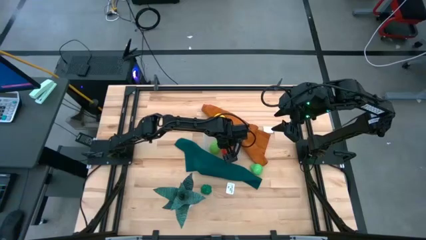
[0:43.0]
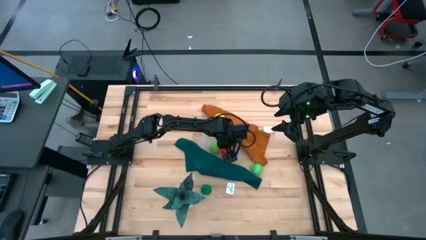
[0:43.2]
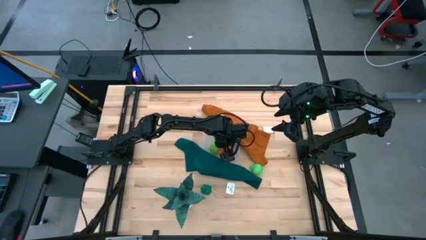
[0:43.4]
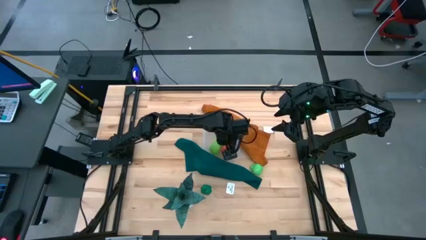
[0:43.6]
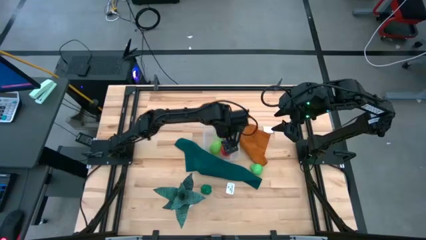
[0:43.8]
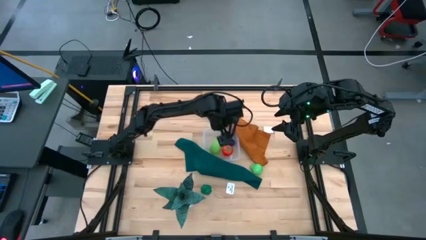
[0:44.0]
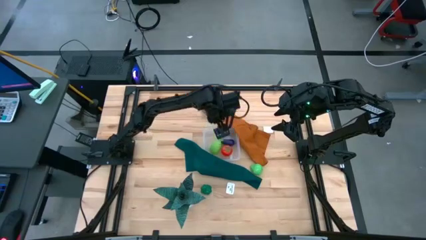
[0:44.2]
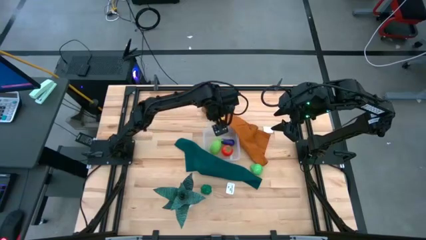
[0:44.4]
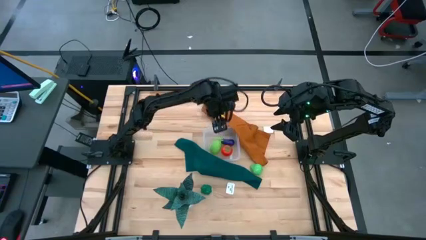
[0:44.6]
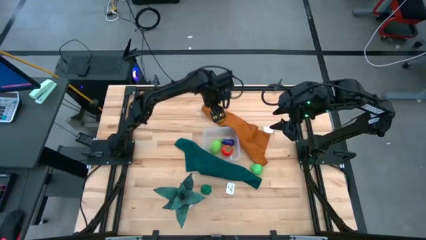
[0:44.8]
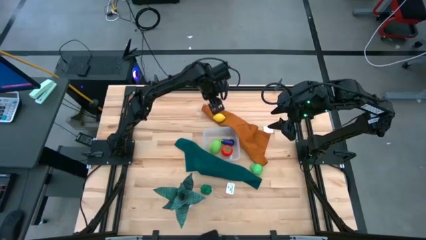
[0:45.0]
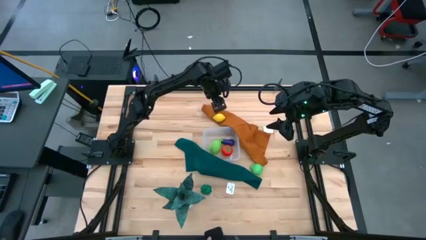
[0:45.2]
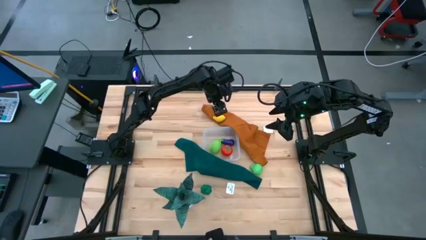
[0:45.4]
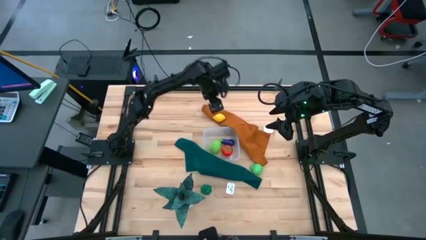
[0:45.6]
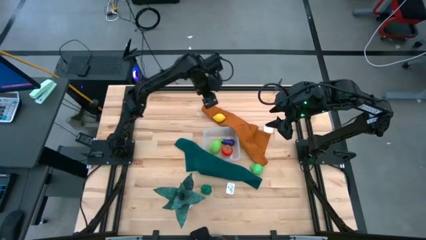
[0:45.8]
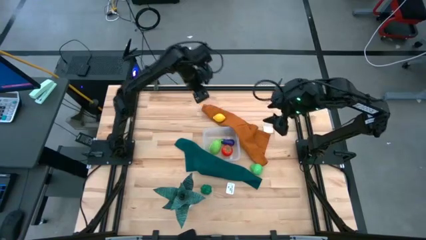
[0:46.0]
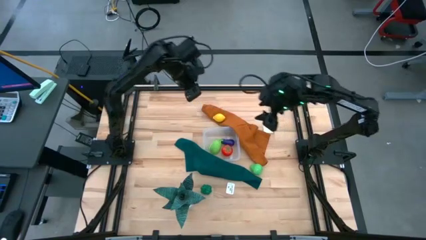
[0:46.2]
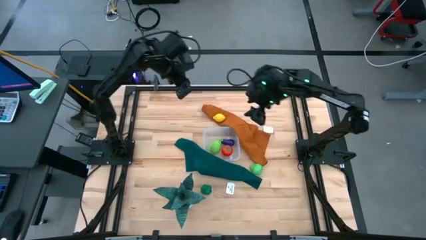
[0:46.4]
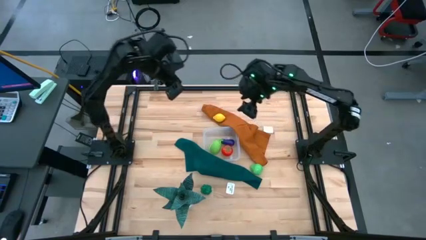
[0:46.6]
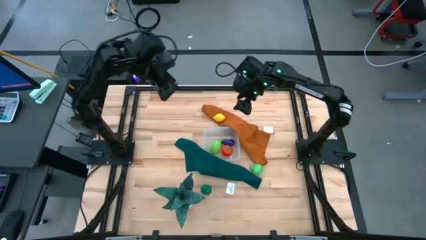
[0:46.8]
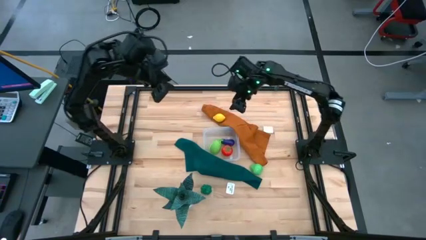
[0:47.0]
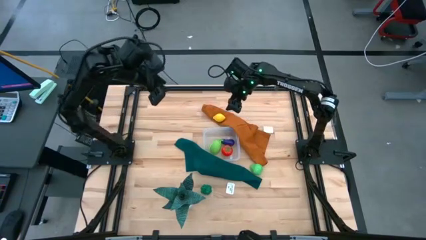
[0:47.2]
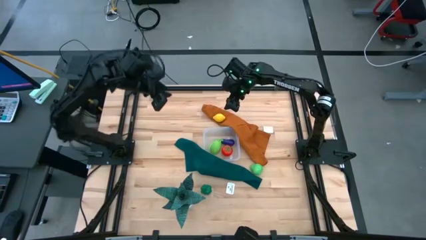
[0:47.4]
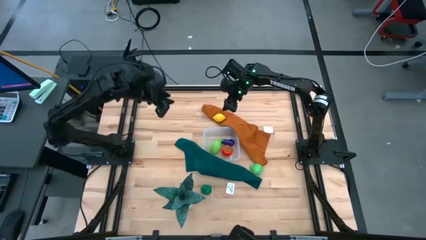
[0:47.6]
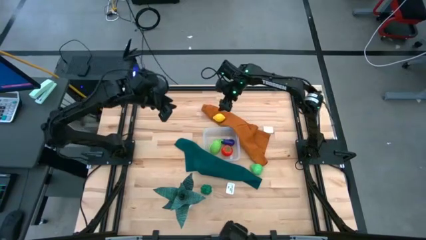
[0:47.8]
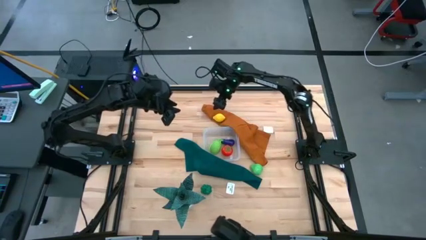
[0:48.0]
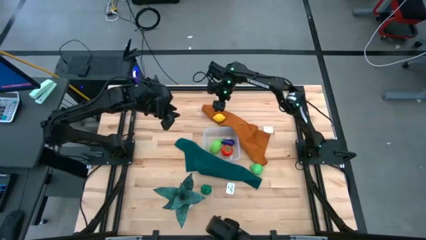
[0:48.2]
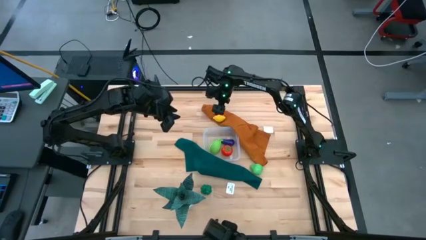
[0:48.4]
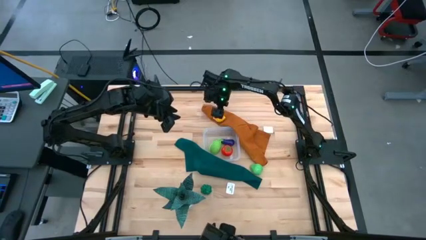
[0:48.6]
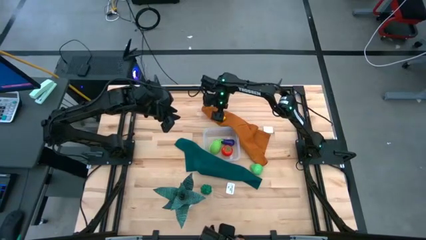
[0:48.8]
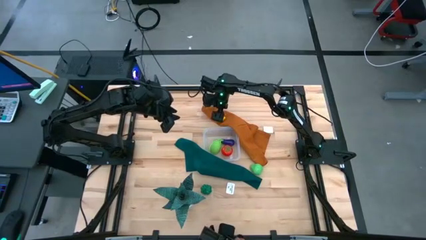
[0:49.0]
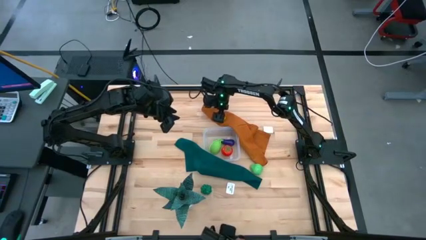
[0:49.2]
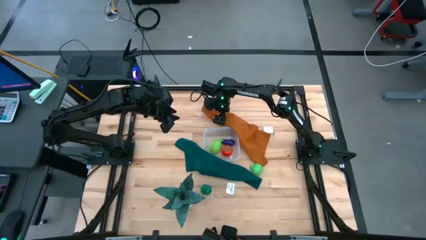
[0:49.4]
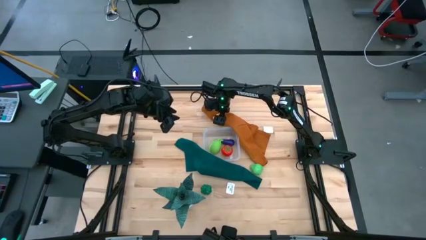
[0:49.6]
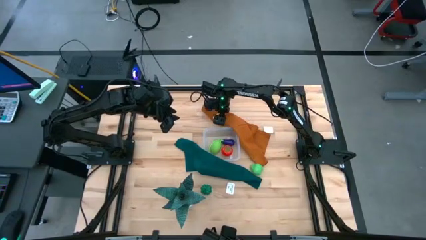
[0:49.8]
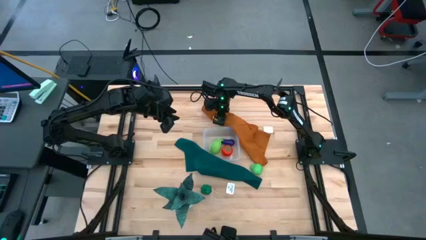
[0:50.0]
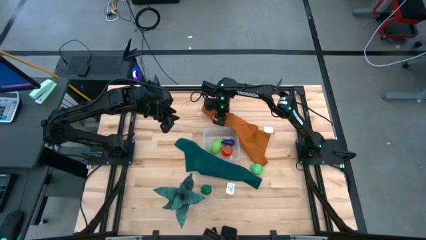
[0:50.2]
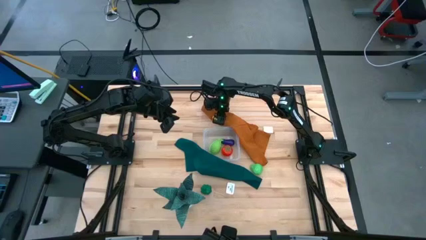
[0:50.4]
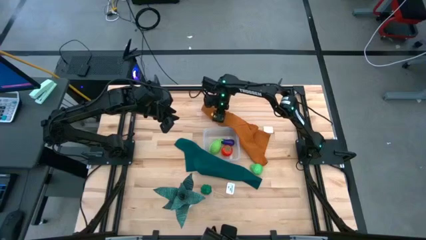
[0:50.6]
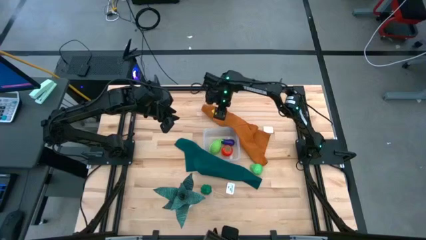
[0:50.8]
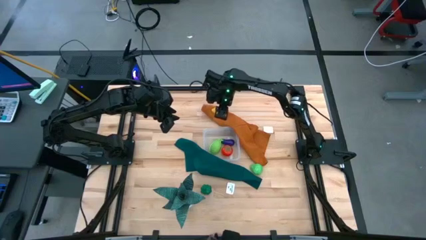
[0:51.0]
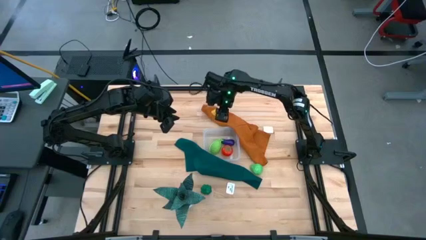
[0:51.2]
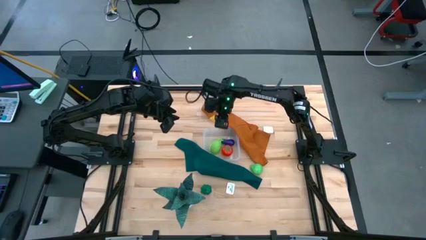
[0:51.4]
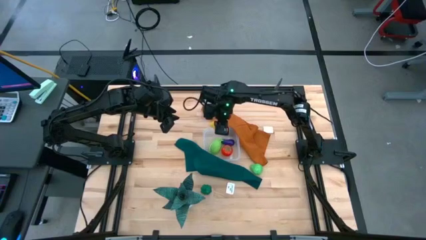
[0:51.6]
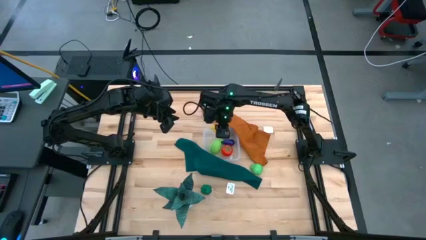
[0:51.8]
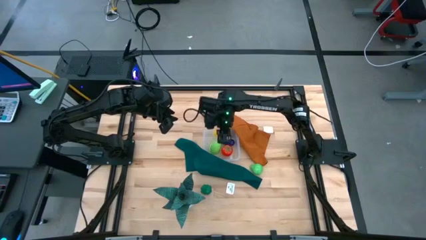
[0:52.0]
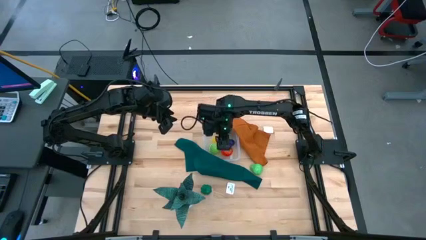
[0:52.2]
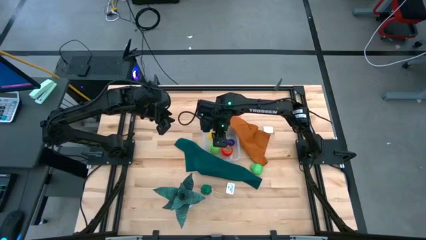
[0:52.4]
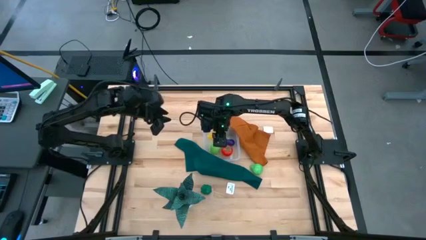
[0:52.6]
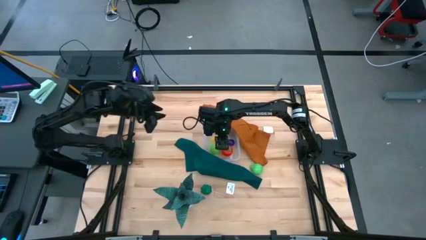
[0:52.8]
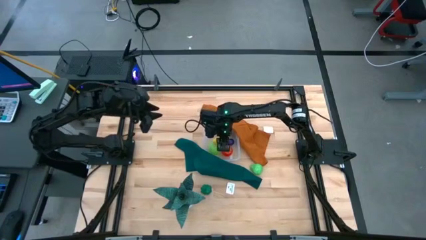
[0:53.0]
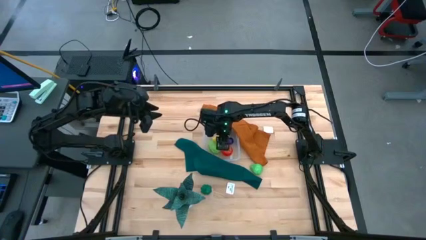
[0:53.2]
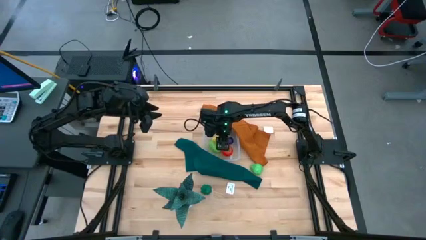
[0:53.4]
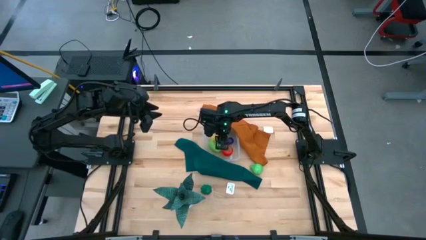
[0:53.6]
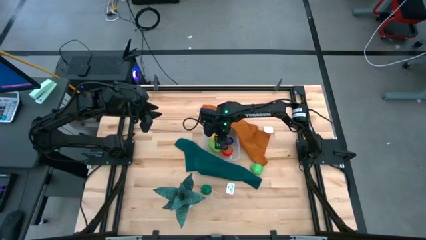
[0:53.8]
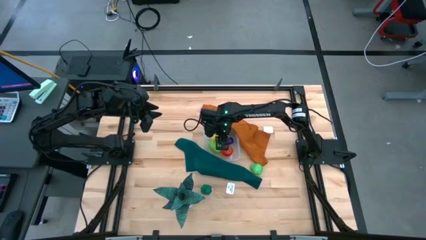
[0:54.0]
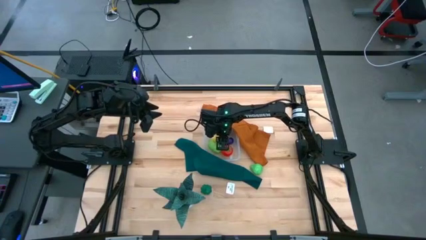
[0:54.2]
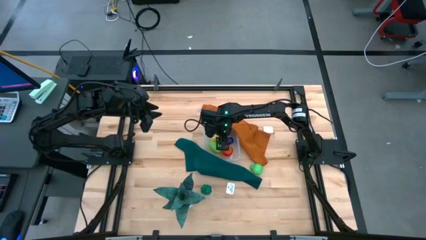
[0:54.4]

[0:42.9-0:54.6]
Task: Pick and placing Produce into tupperware
Put the yellow lemon into the transparent bin

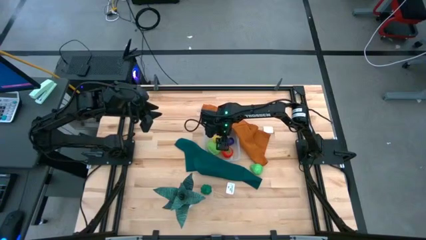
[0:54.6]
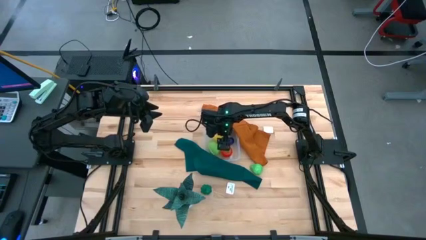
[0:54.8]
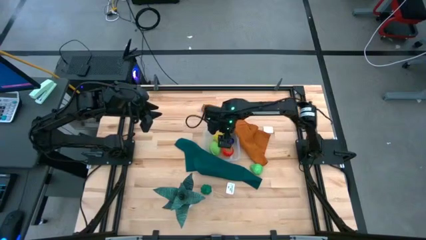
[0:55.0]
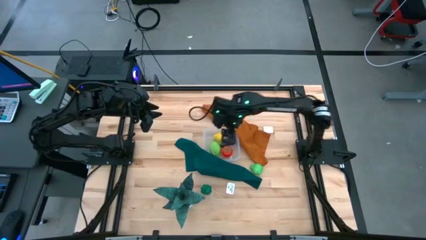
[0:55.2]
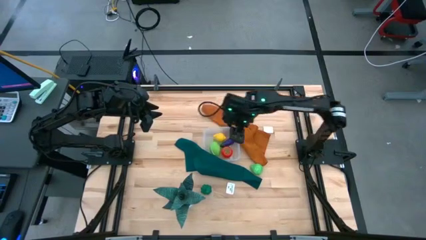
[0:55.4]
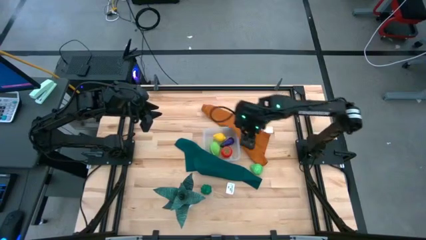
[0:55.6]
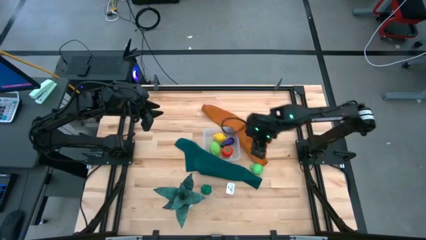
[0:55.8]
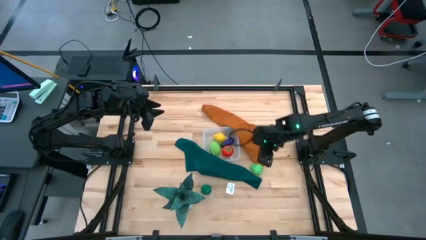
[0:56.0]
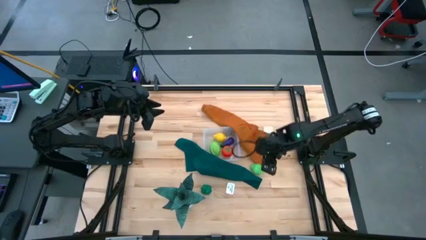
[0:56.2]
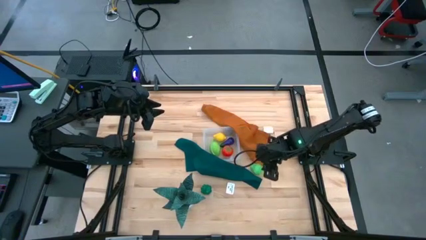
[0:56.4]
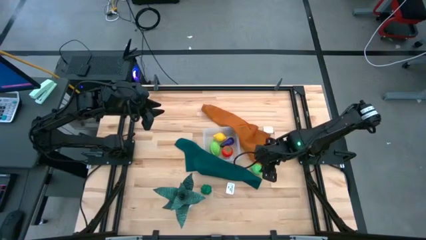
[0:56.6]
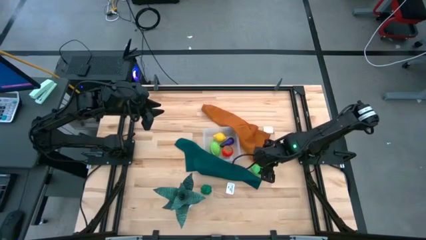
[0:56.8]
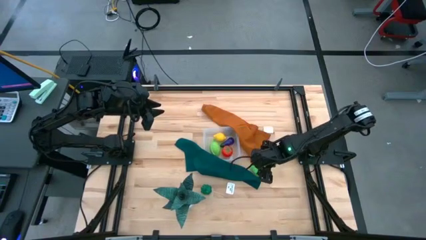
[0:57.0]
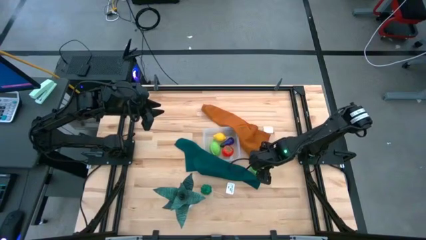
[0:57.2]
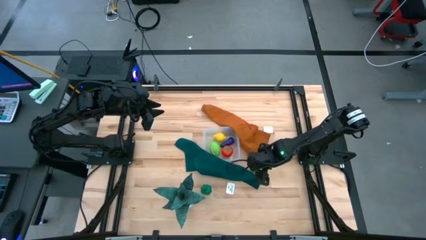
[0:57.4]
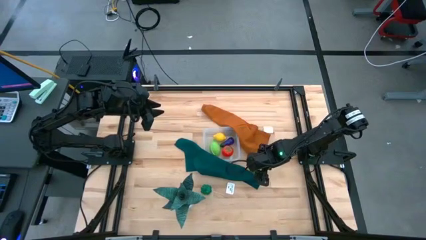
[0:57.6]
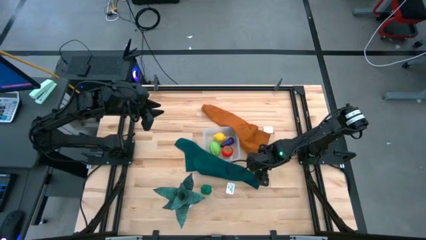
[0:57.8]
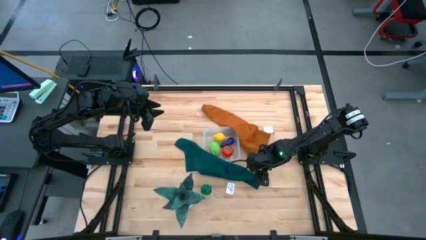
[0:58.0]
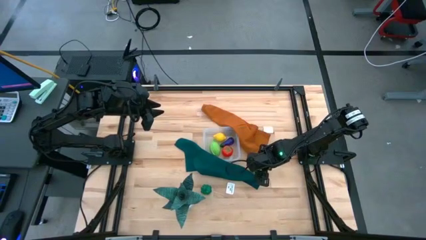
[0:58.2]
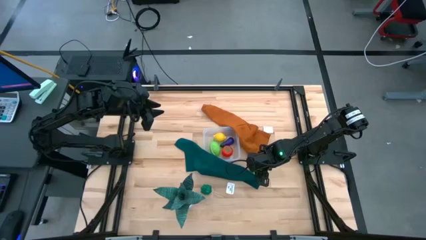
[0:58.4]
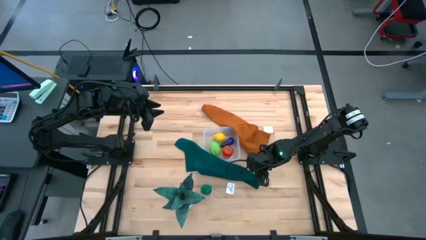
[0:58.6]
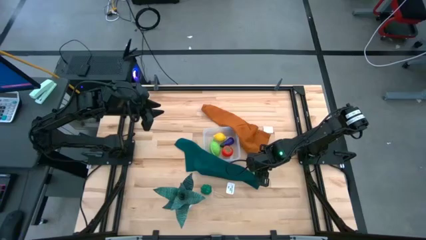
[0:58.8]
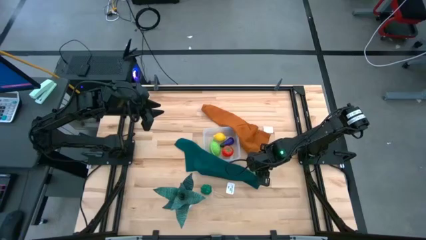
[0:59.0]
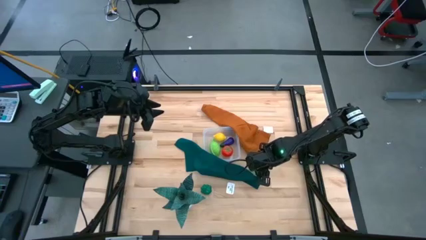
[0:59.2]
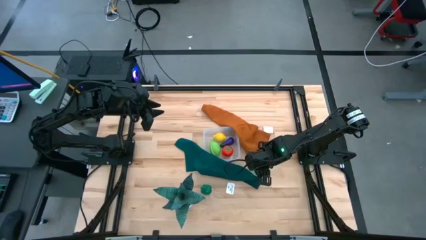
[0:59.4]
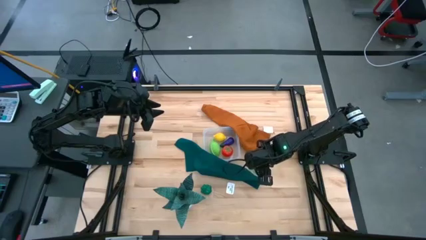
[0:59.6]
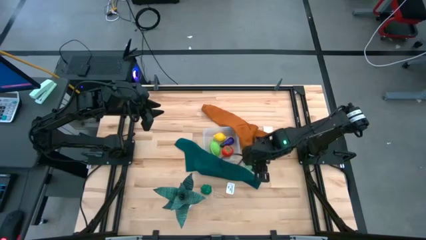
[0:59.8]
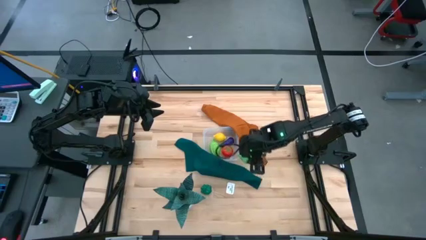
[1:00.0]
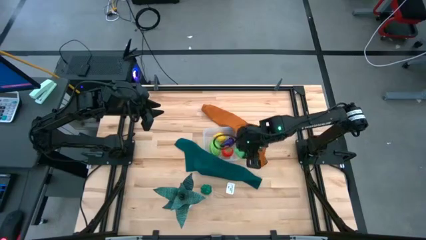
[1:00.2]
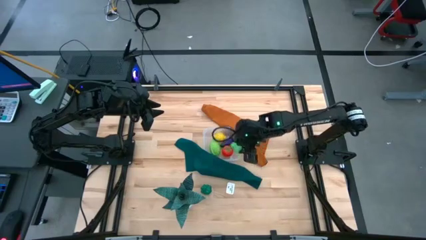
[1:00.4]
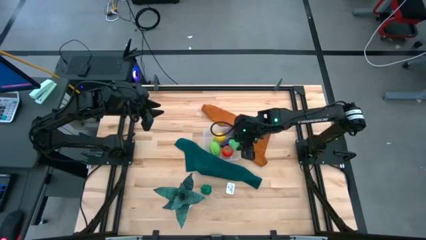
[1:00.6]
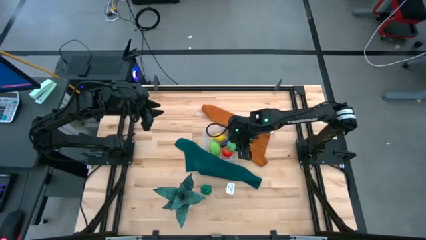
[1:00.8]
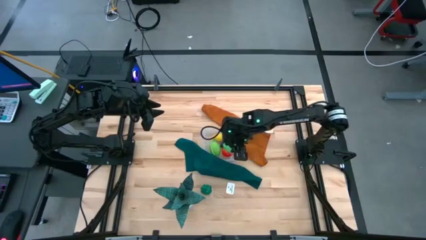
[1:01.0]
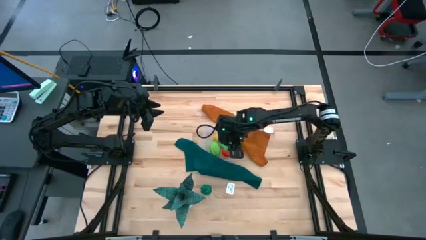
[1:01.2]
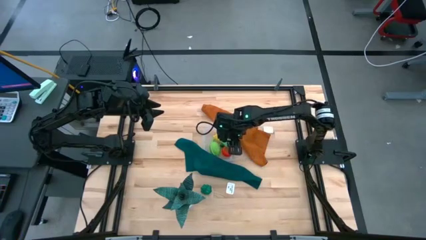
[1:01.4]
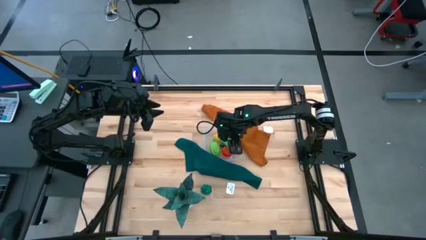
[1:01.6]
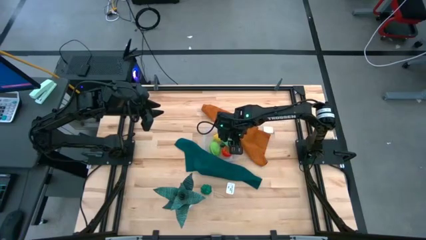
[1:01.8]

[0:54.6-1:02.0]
Put the green pear into the transparent bin
